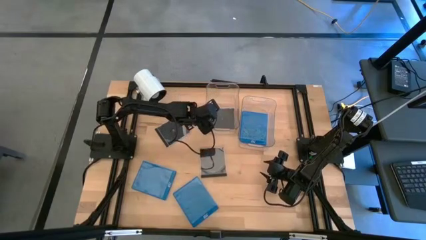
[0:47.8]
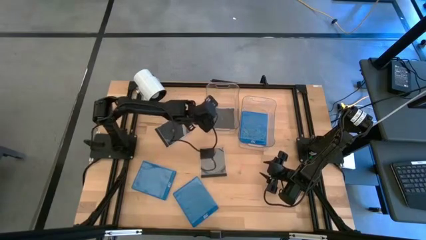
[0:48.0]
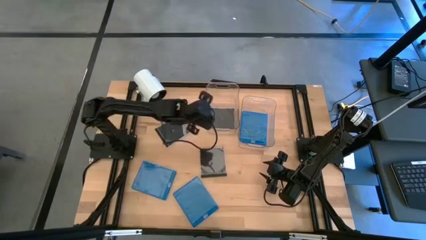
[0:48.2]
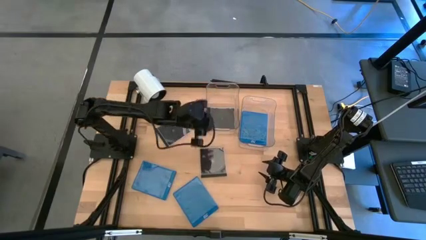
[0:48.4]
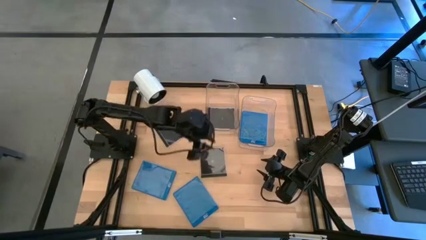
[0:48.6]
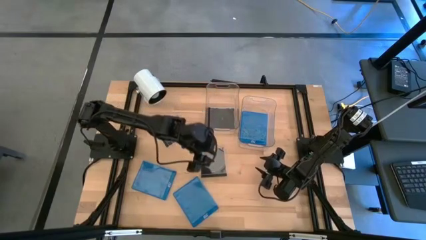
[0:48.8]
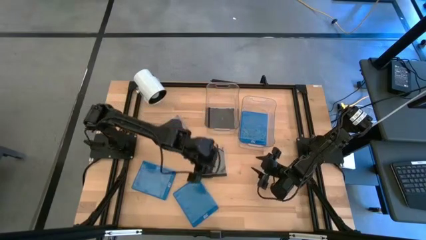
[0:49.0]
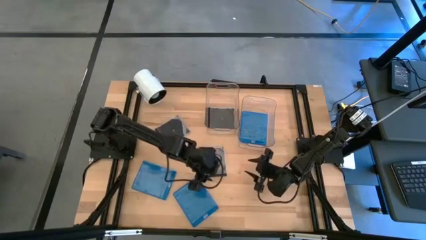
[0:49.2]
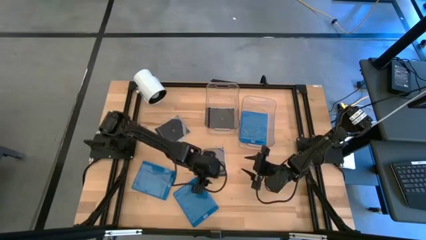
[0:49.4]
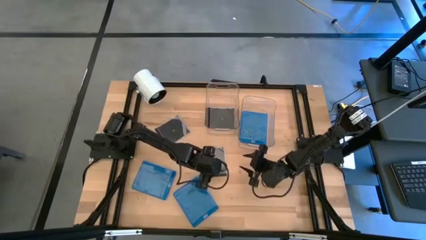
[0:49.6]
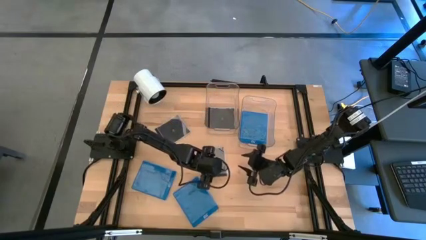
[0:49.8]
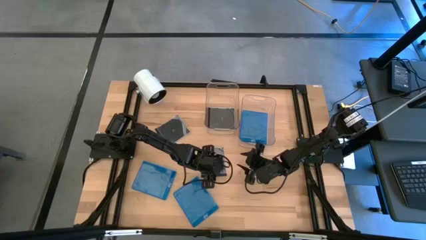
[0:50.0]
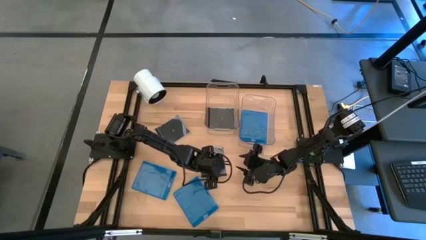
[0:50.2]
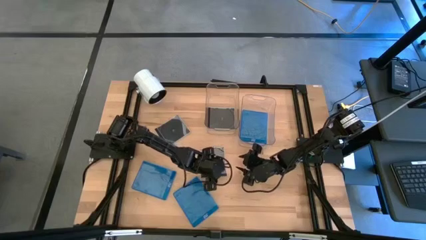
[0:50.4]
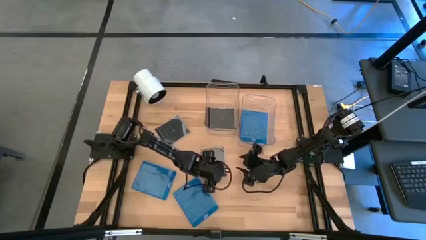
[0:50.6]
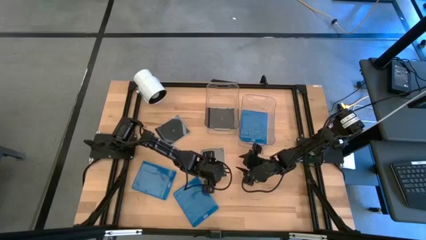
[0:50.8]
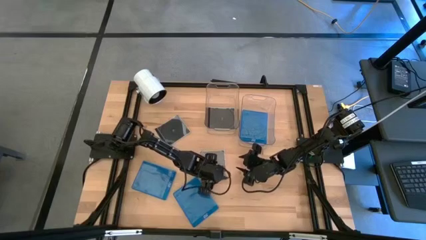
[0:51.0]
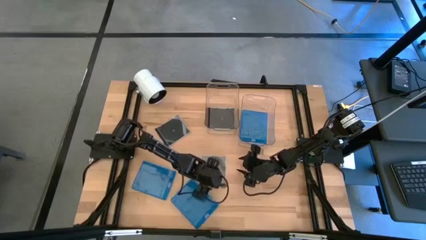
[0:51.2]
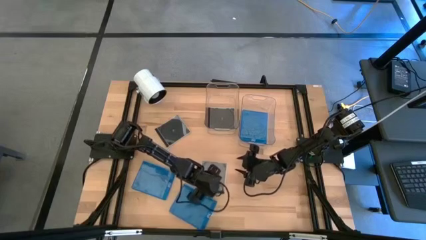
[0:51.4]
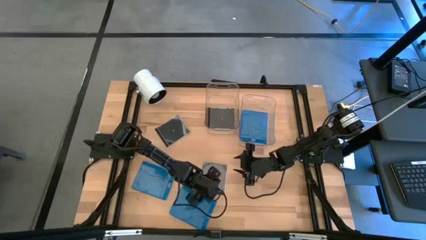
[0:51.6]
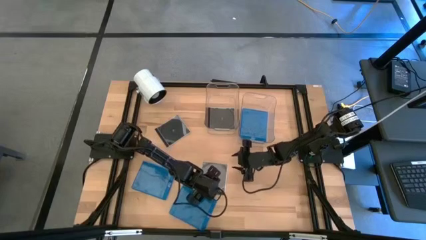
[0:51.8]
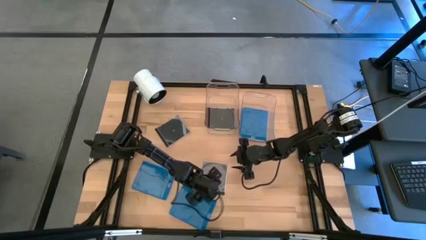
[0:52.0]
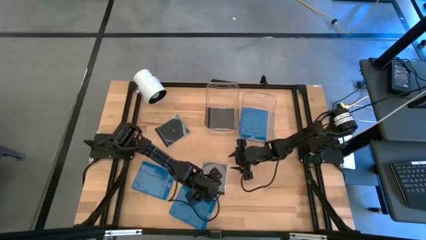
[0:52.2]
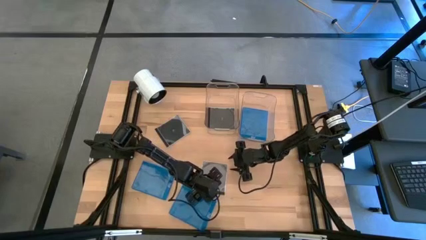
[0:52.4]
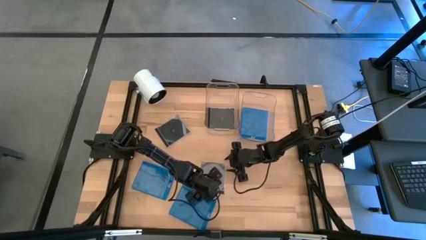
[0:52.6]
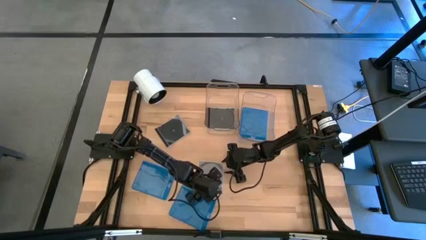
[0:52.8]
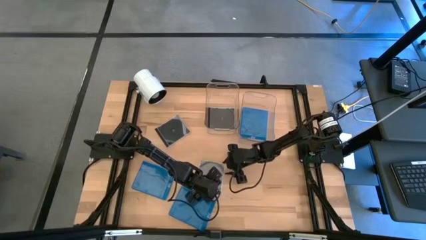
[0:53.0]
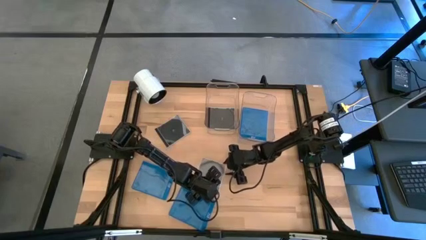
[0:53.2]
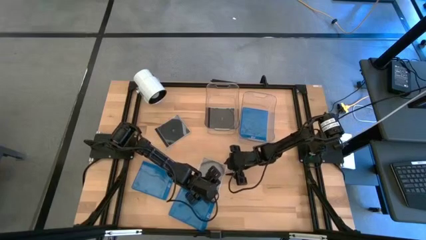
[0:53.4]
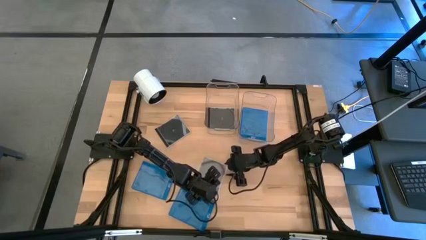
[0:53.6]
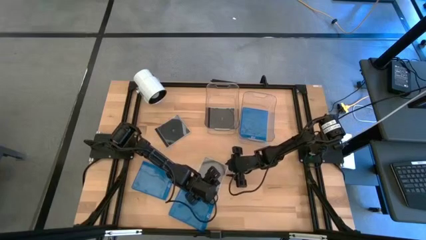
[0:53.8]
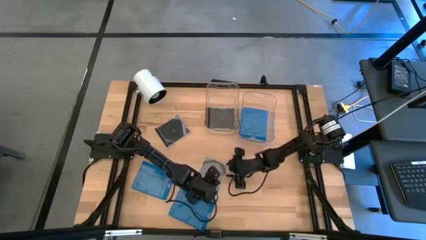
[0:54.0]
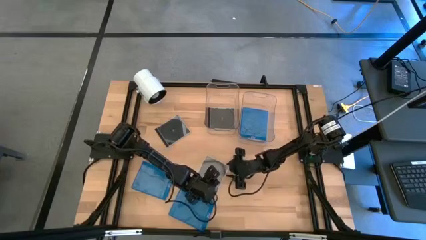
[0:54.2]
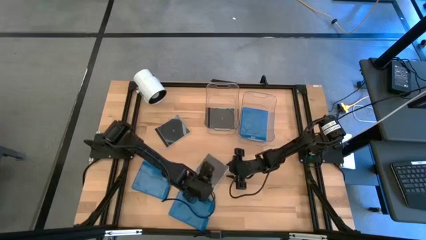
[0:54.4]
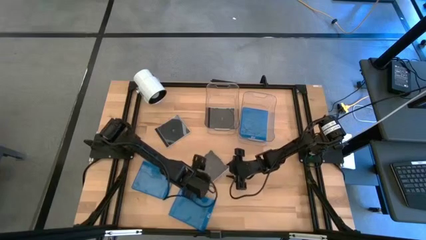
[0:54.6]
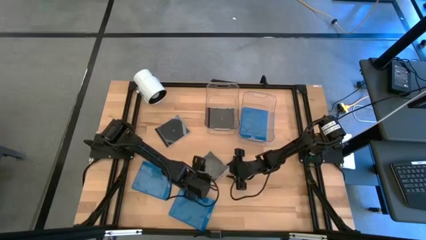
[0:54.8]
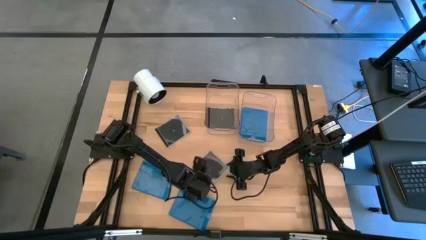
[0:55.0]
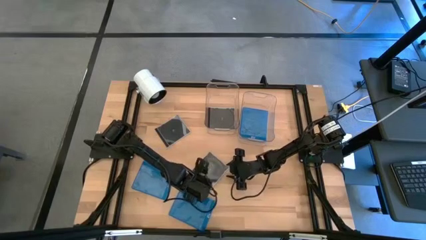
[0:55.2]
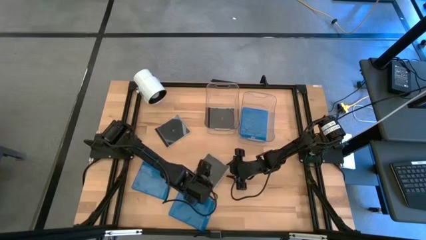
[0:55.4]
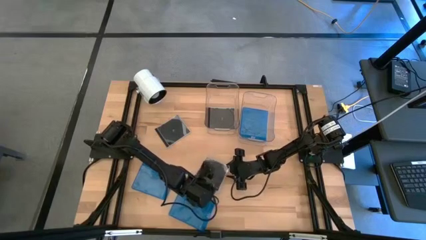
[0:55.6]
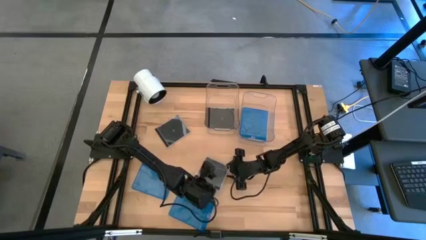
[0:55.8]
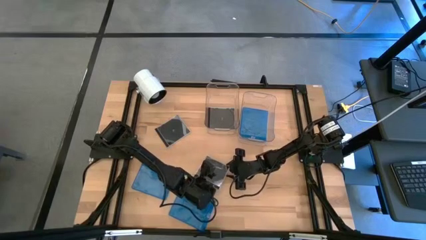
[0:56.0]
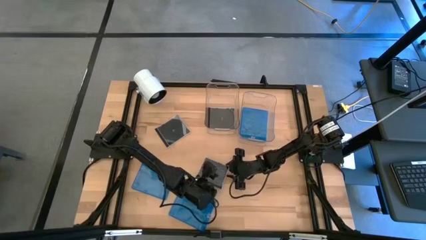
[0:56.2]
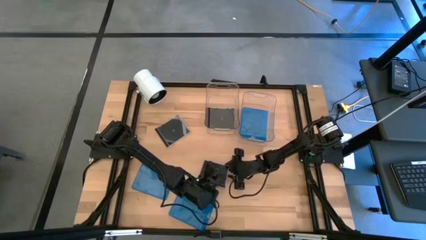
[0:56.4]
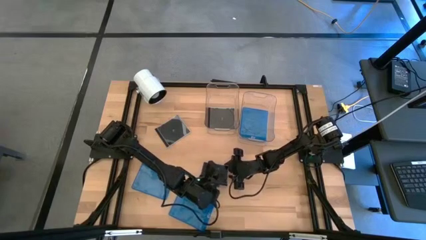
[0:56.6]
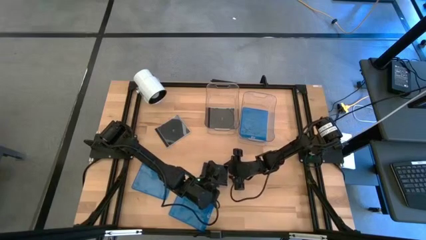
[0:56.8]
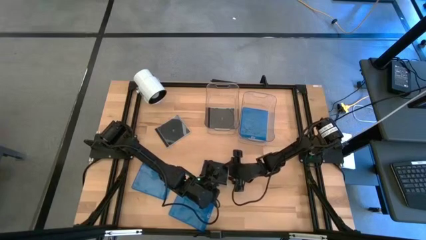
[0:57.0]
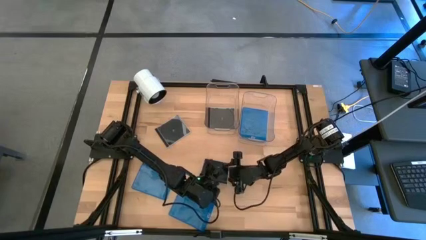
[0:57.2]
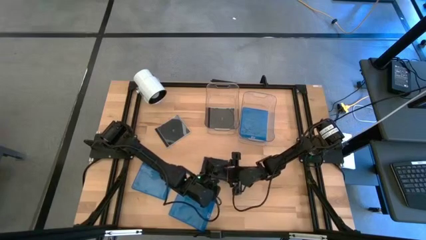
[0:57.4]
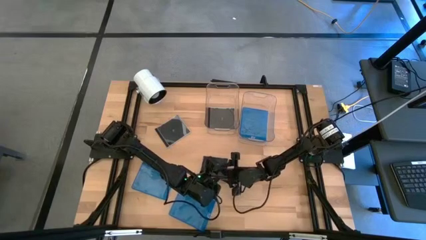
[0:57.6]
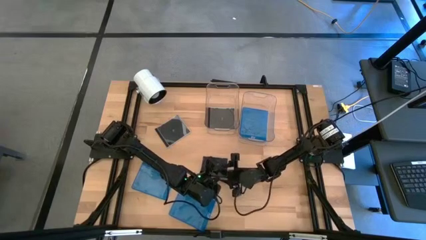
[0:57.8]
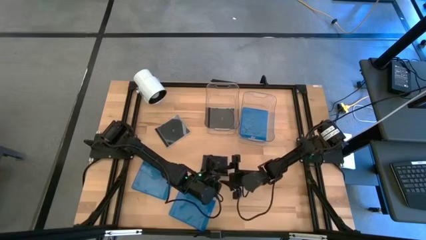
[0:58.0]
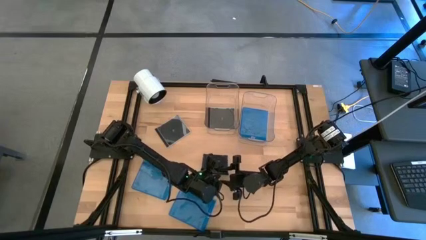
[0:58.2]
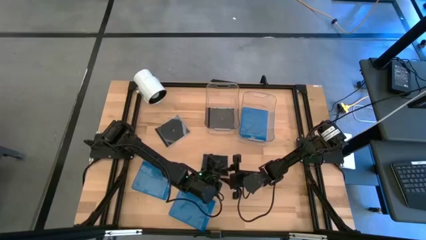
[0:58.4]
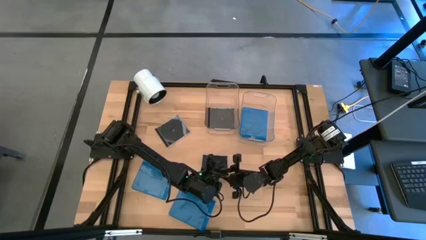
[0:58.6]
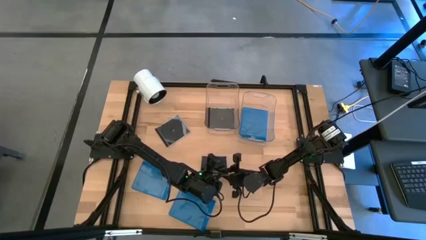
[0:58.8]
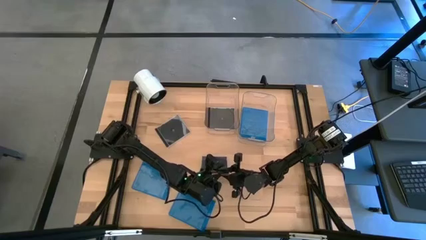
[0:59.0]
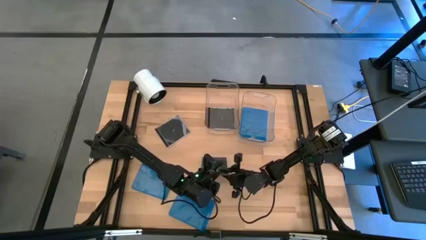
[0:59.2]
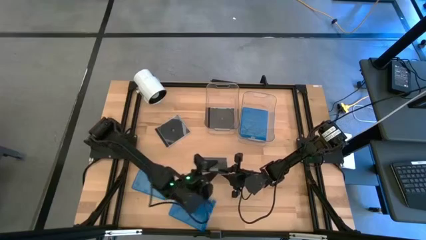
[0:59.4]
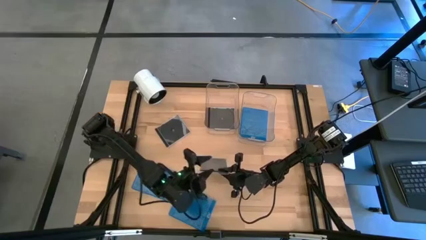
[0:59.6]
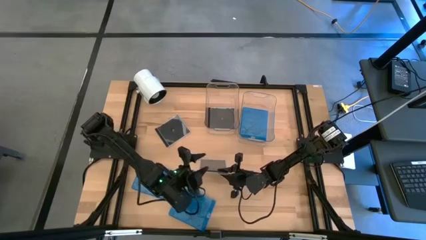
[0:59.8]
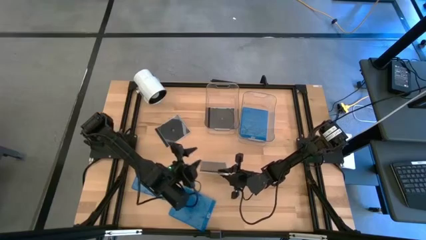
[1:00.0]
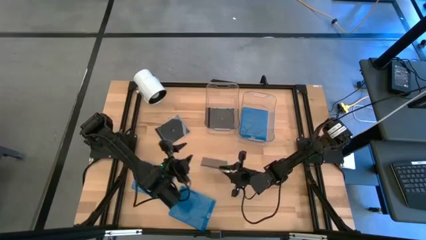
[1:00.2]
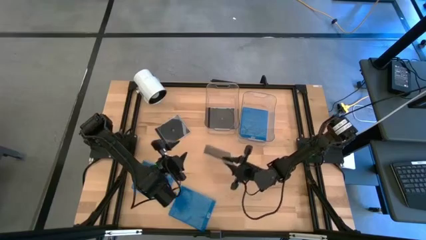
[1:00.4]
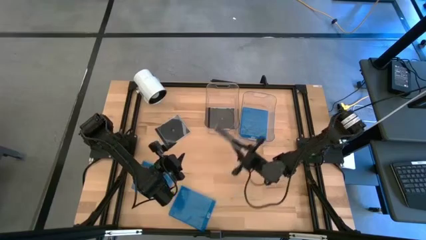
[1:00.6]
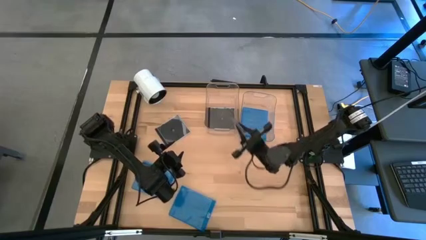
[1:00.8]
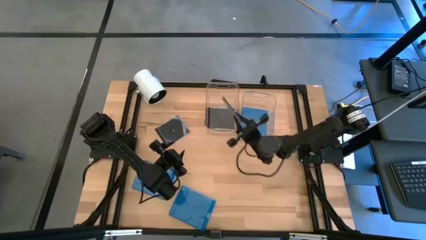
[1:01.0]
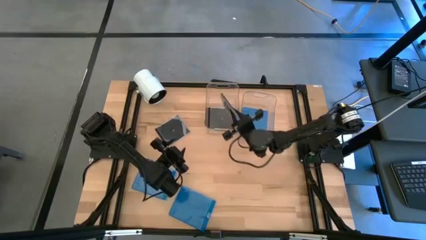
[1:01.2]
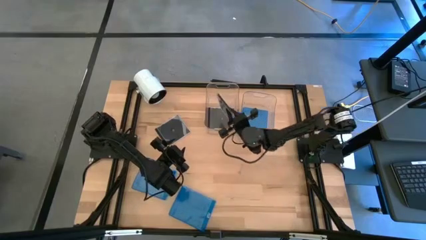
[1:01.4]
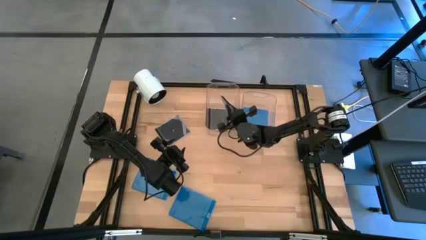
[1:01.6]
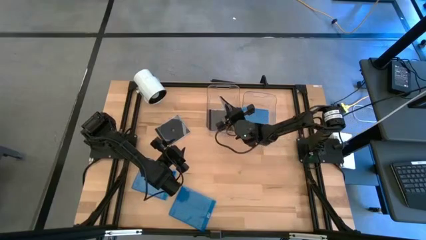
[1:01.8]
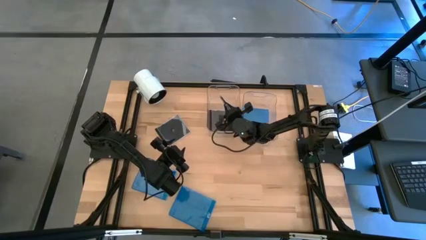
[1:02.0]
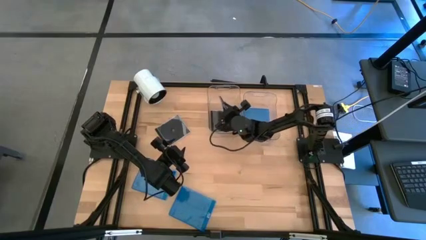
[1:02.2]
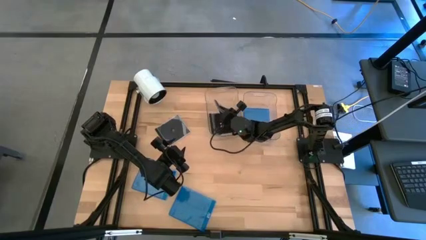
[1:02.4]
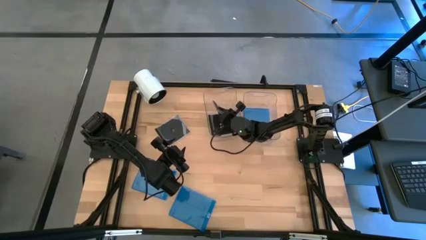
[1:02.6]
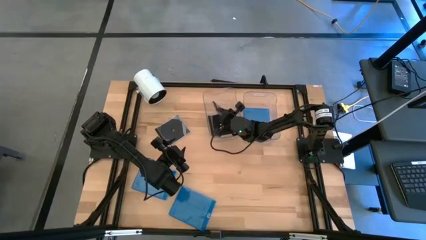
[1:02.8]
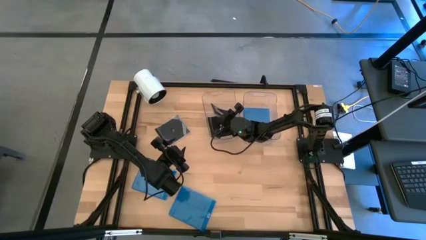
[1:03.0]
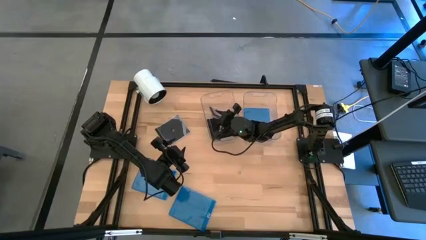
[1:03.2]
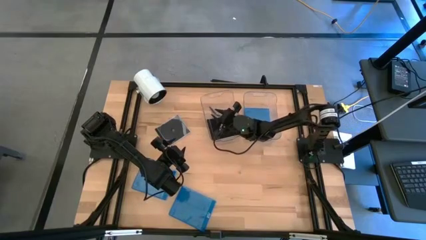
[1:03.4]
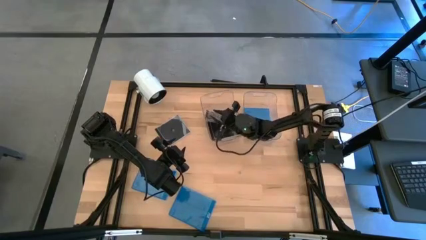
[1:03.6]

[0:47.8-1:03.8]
Task: Pick & place jewel cases by type
Put the right black cd case into the left transparent bin
